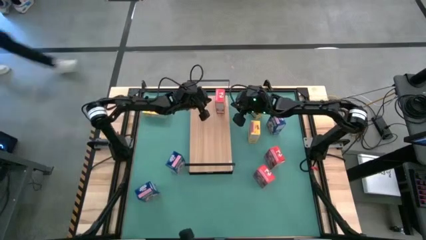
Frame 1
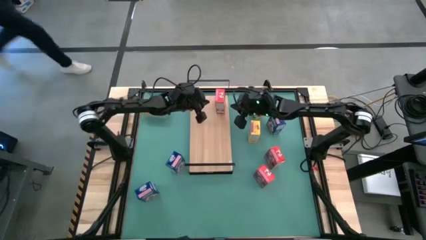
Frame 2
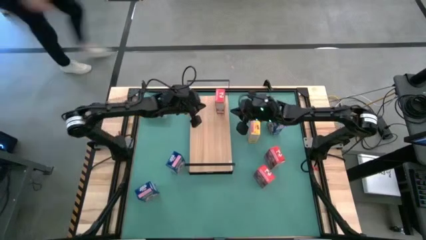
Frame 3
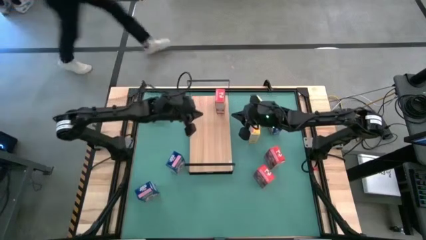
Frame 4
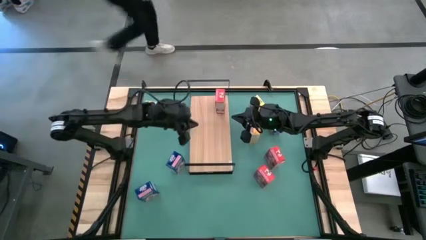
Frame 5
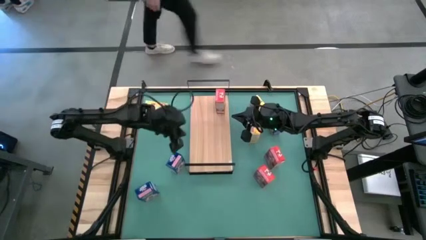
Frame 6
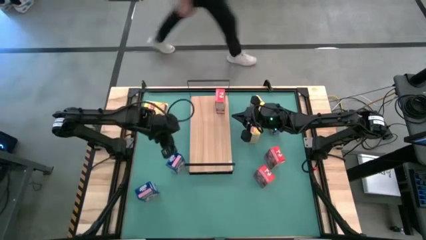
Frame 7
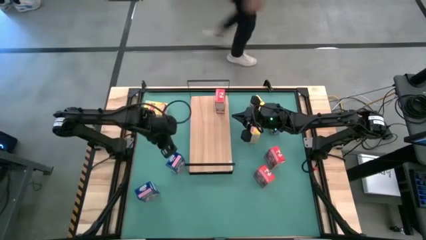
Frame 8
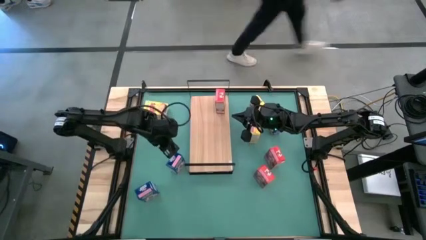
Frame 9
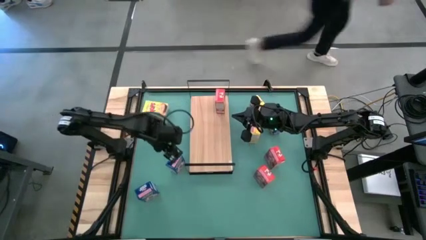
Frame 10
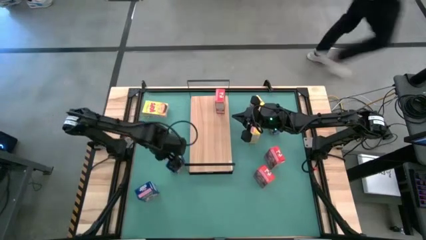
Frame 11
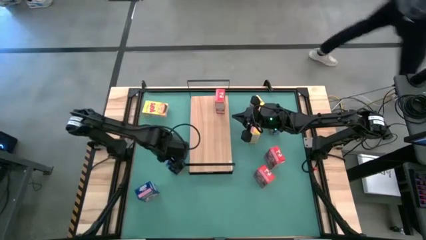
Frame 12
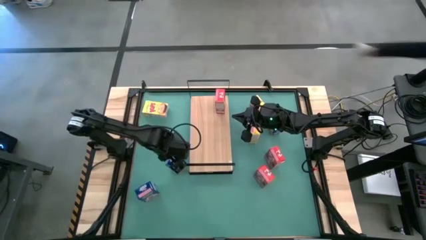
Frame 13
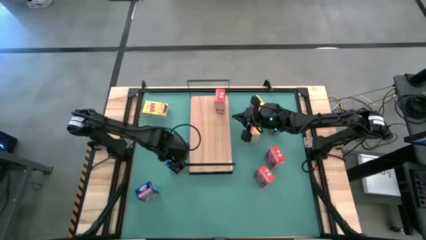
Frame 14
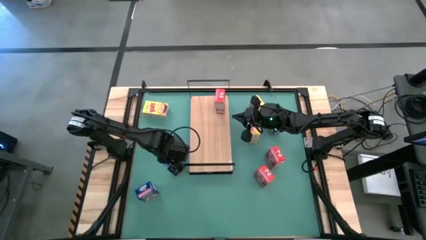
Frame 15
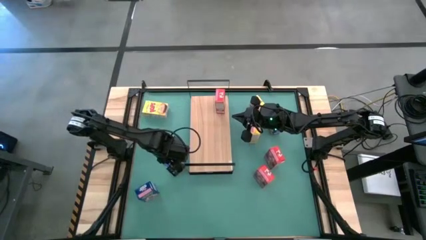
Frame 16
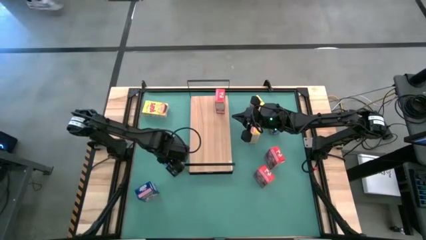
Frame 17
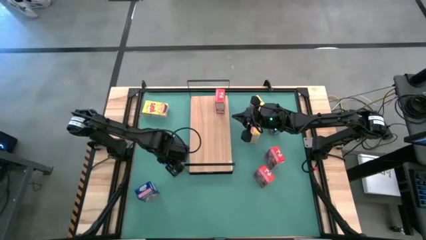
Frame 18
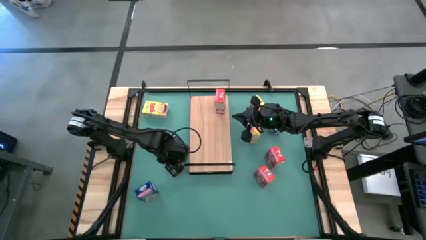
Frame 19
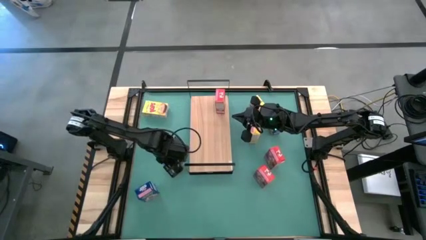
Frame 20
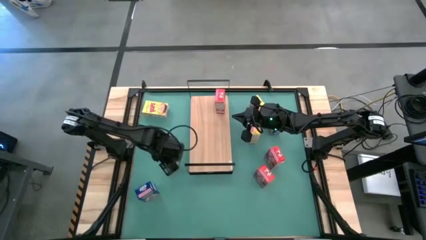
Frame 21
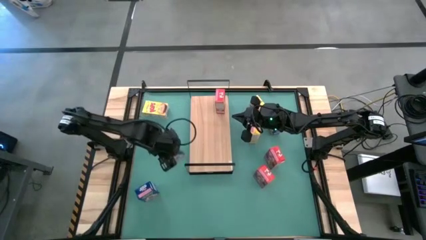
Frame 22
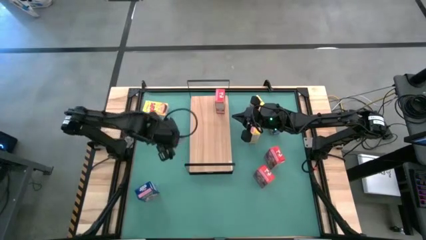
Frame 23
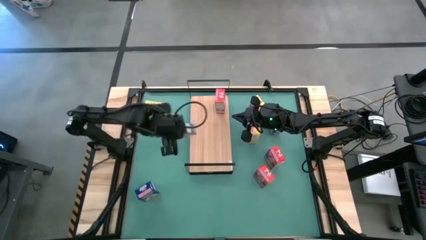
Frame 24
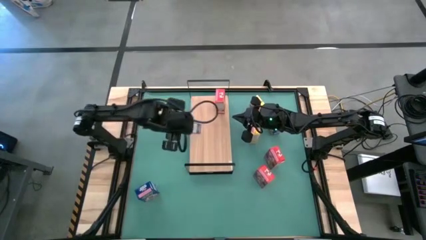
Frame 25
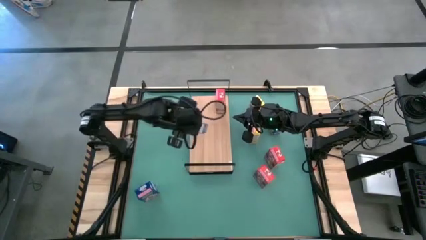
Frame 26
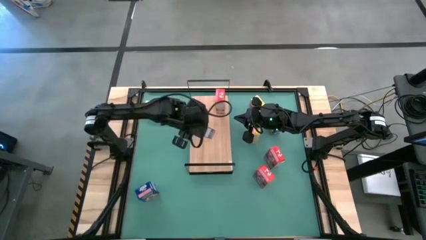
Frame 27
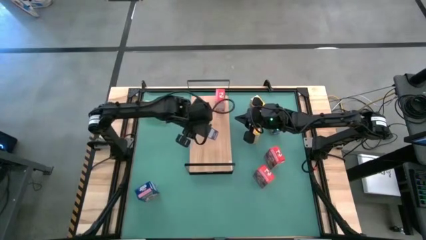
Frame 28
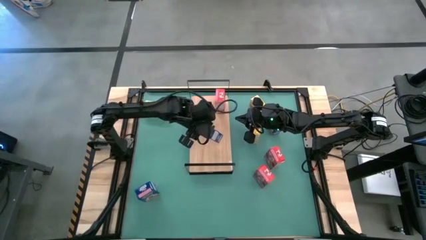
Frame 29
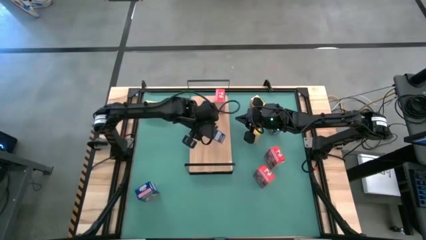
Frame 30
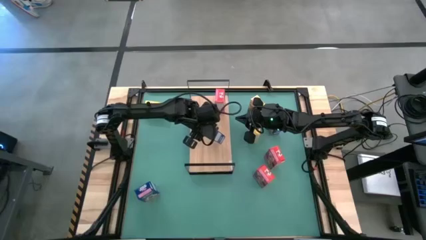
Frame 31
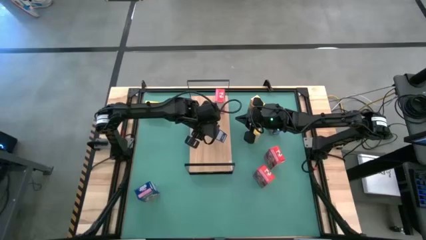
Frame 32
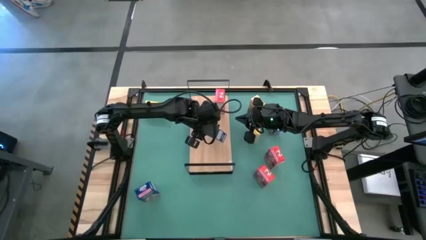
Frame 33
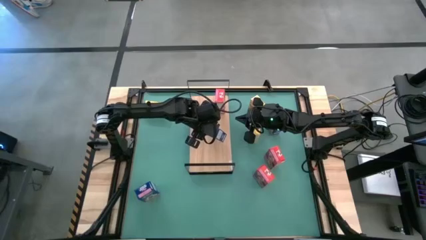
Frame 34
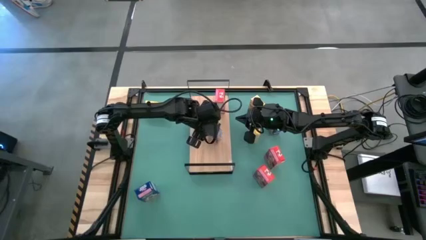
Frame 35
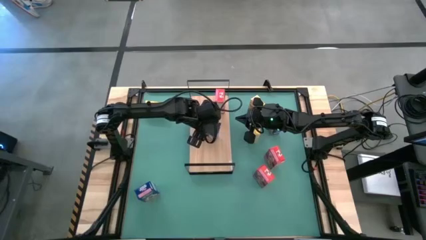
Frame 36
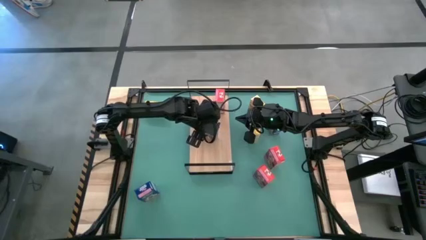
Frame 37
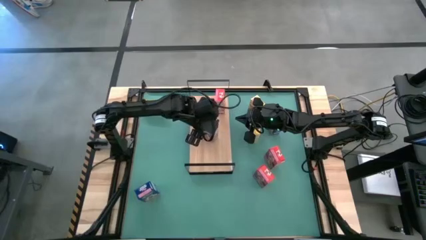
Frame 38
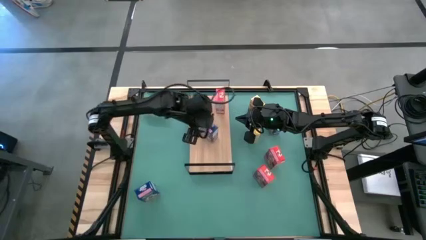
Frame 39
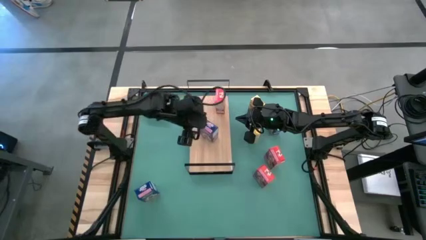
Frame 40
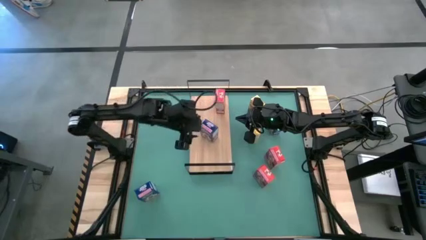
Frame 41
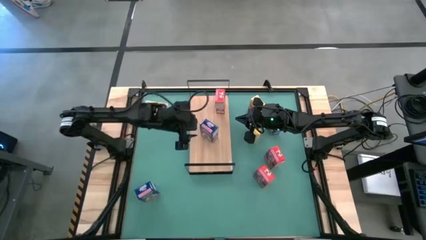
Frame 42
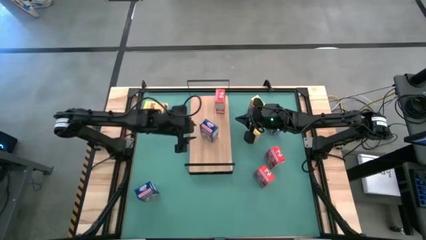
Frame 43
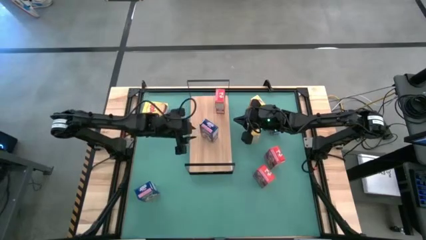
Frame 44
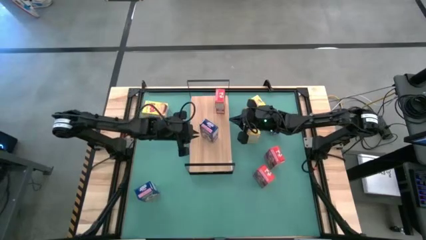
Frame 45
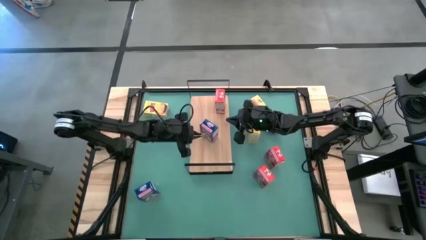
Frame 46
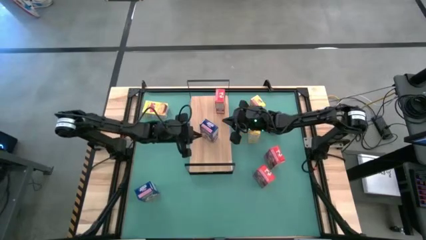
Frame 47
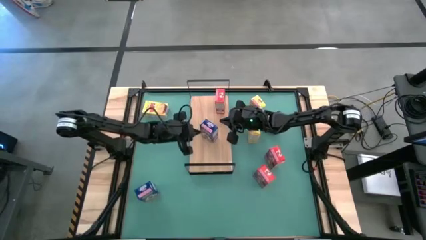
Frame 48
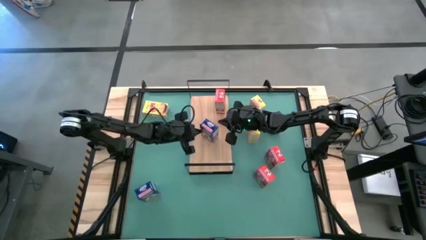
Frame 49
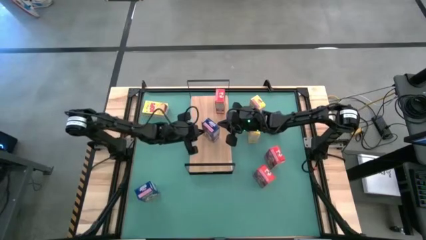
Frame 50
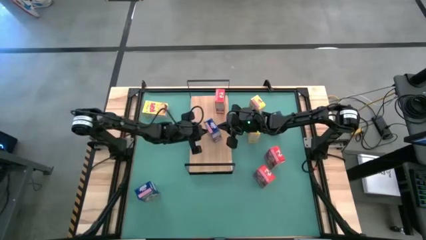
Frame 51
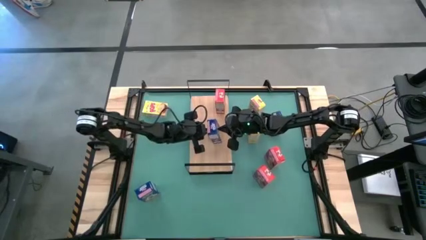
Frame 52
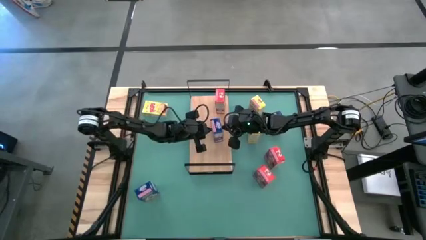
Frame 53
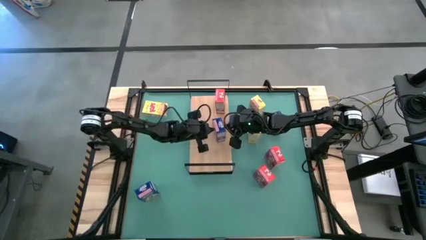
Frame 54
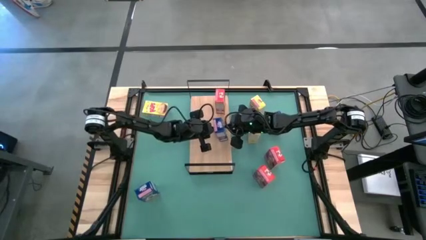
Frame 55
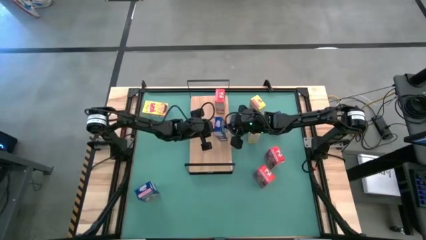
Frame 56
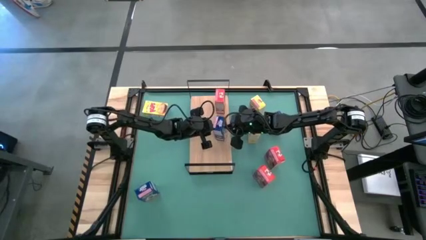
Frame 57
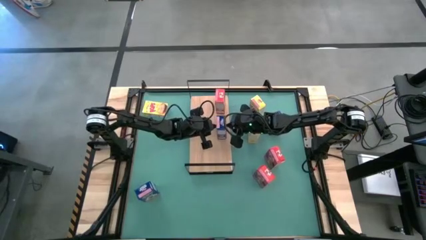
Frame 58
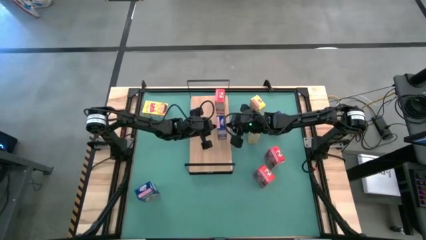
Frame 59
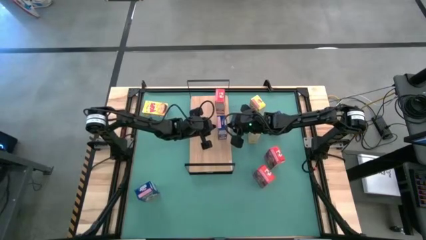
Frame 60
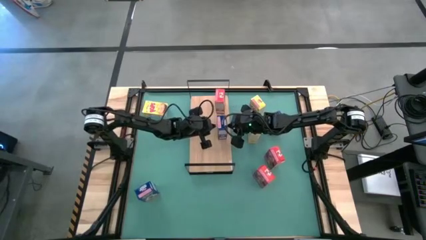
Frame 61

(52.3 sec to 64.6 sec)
Task: Stack cereal on shelf
Put the middle blue cereal box on the shelf

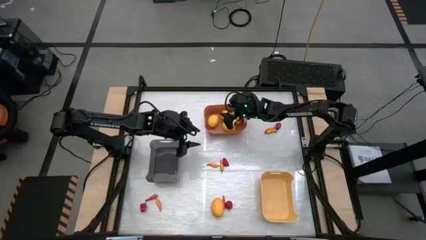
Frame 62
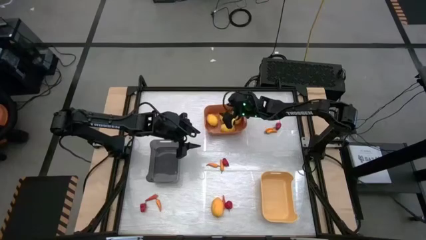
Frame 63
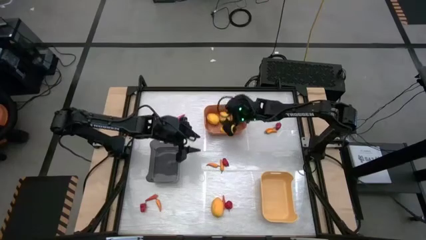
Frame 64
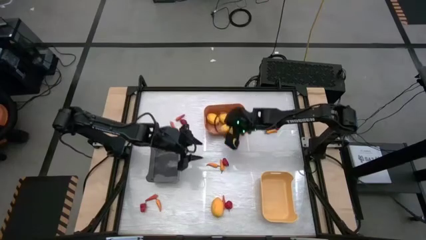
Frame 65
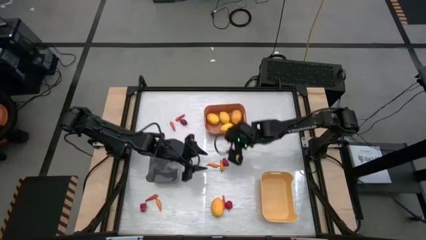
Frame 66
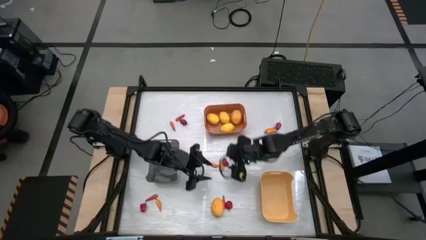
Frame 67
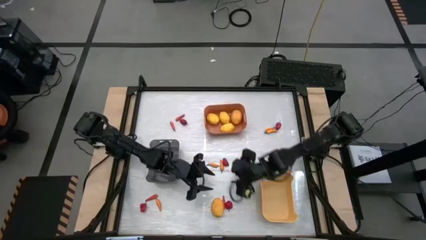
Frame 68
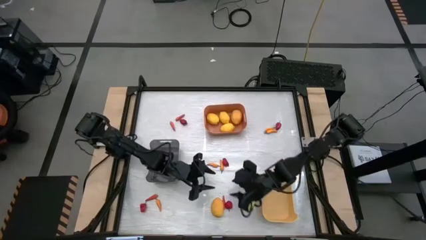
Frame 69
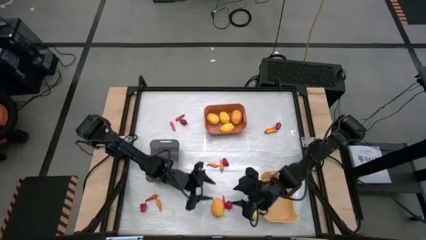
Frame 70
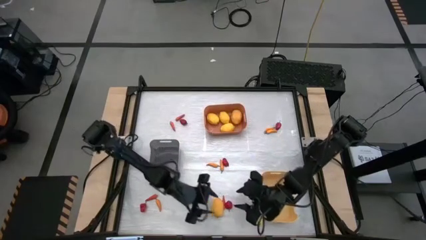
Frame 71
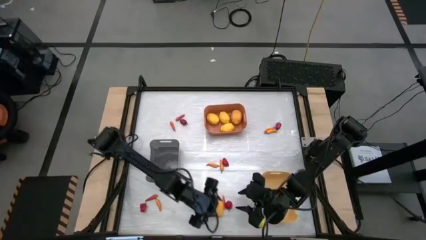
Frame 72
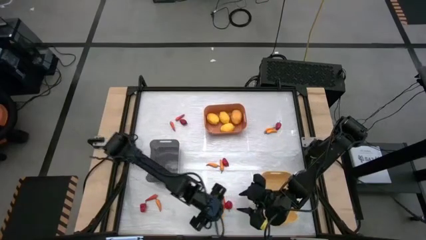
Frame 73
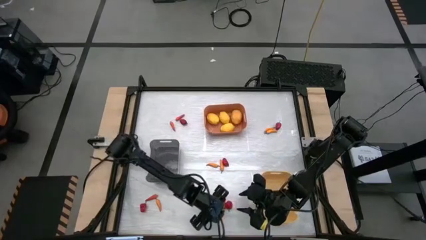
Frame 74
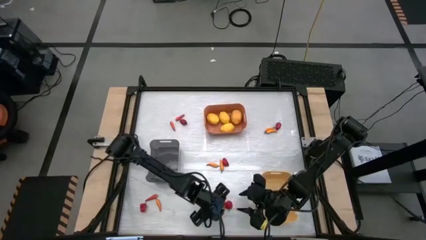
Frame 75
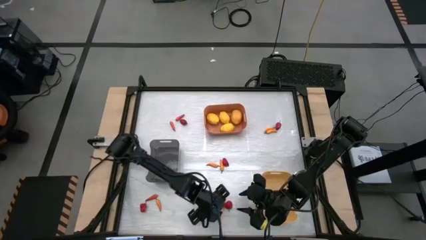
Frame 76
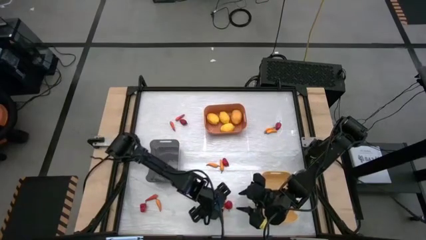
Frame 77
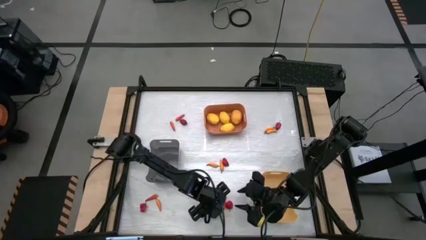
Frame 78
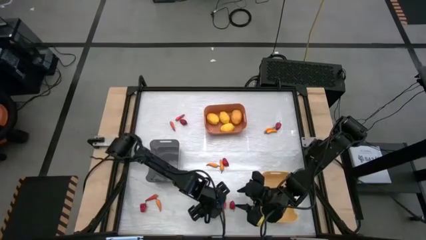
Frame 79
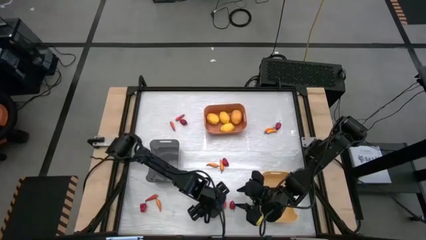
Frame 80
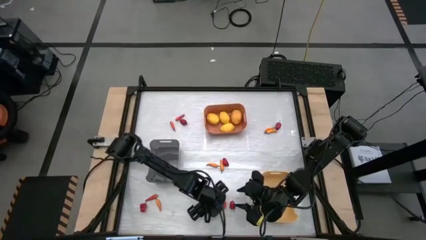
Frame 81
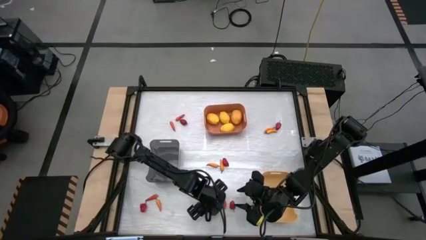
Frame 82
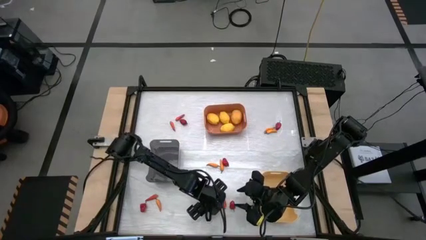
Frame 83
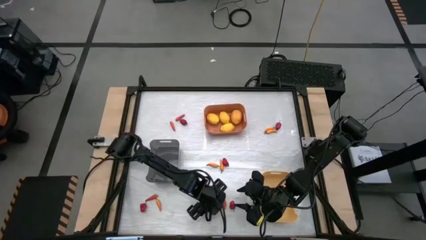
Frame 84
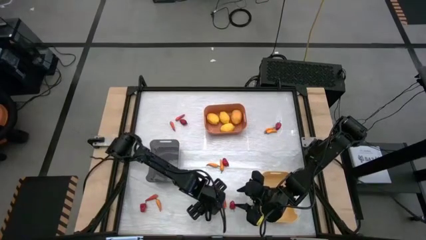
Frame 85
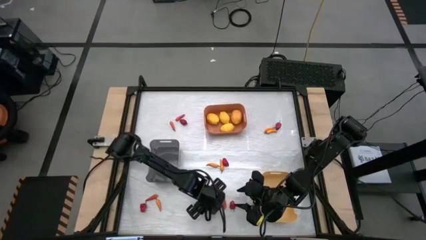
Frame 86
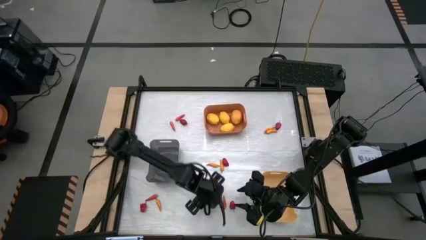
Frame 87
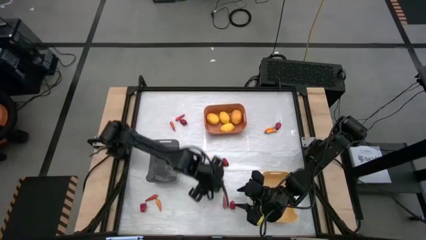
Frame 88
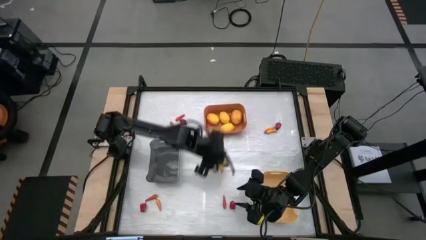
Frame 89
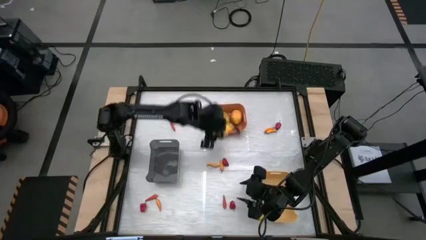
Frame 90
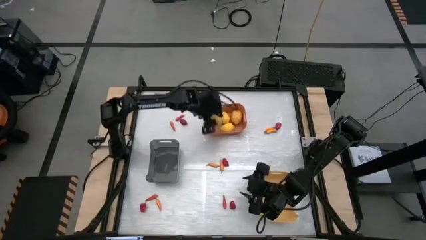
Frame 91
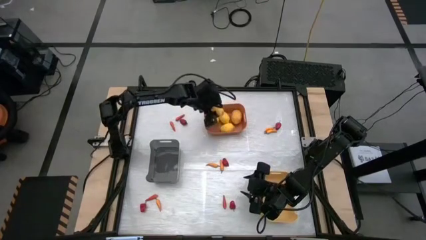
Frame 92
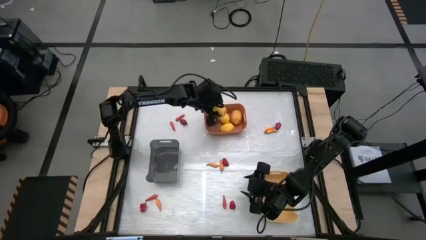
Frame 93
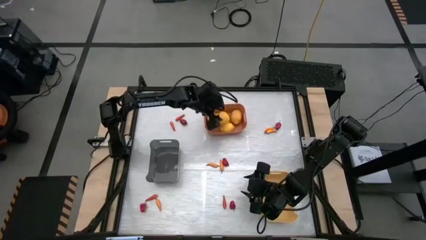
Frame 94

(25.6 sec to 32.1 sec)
Task: Sort produce into baskets
Put the lemon into the orange bin
